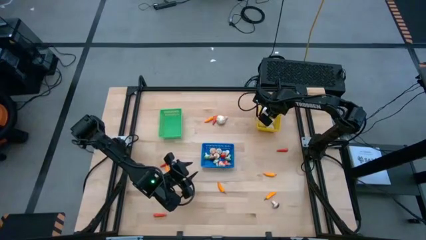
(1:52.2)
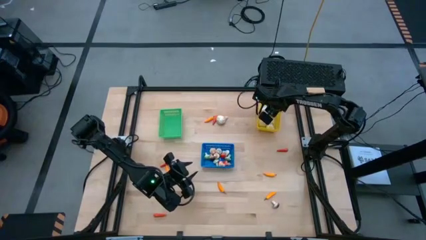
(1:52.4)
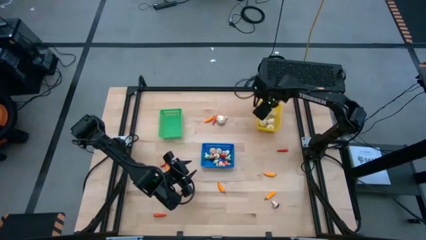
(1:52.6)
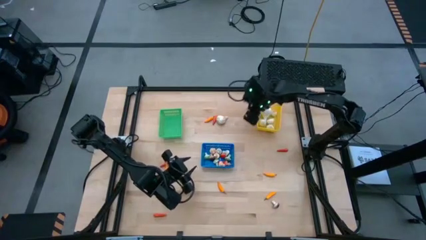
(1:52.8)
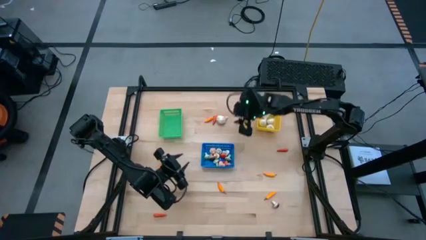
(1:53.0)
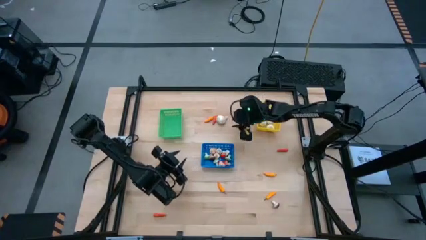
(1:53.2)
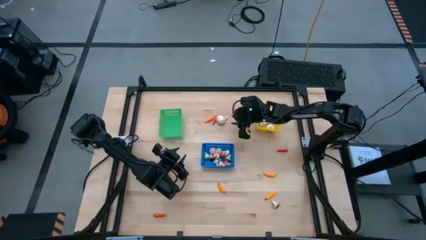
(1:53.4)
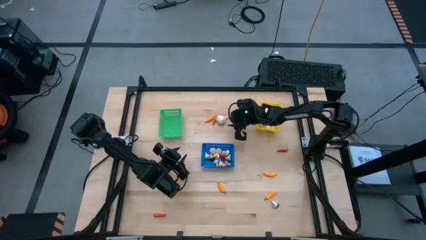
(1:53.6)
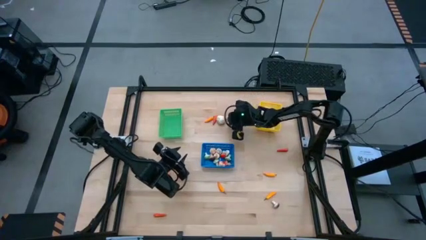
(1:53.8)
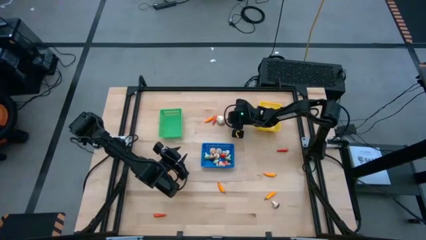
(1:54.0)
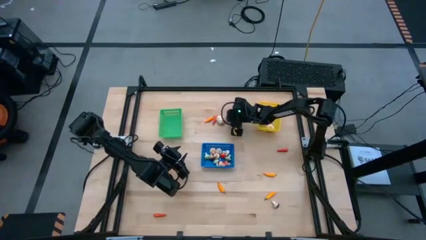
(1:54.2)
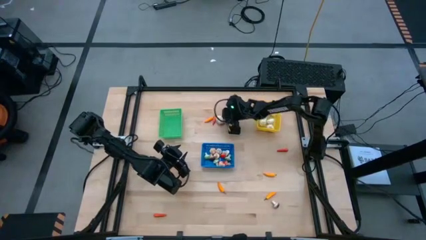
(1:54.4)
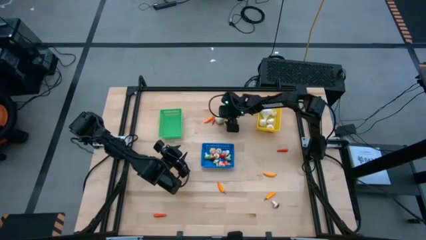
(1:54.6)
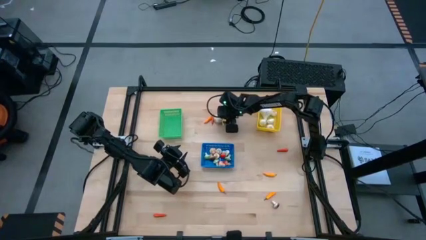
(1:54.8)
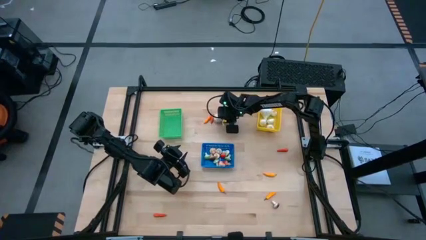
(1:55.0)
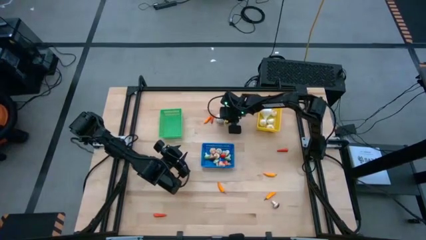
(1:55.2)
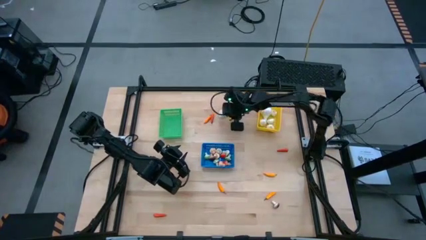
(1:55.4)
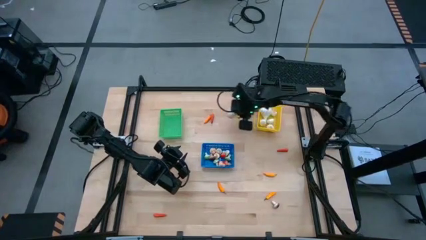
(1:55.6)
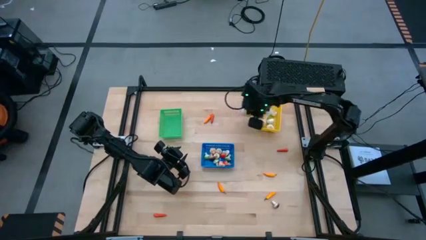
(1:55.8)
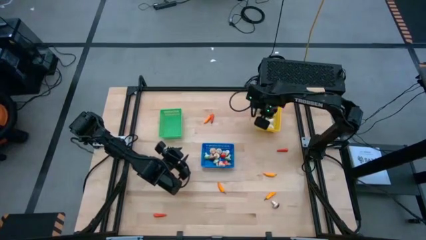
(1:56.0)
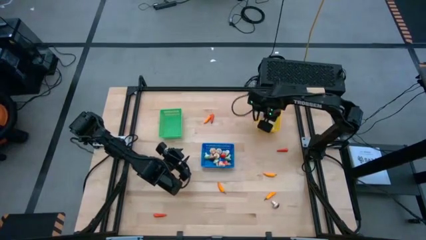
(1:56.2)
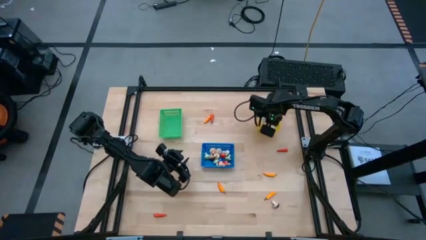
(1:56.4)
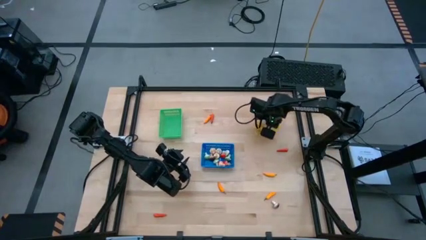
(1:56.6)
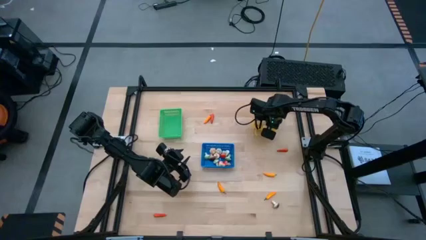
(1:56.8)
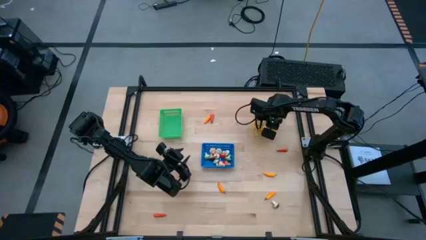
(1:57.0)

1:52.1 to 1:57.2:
Task: Sort produce into baskets
Put the white garlic into the yellow bin

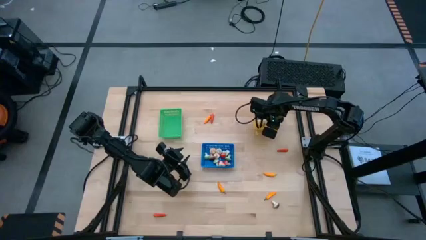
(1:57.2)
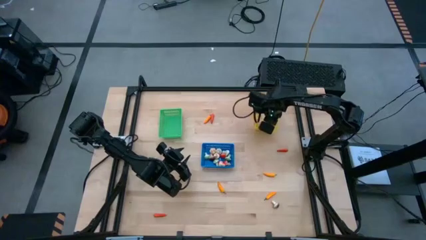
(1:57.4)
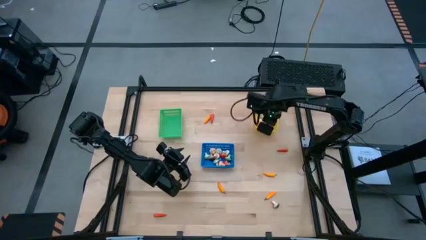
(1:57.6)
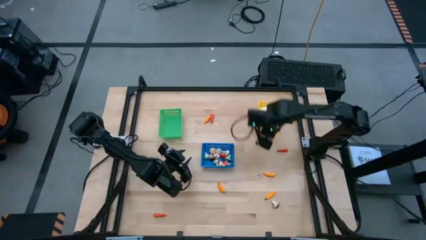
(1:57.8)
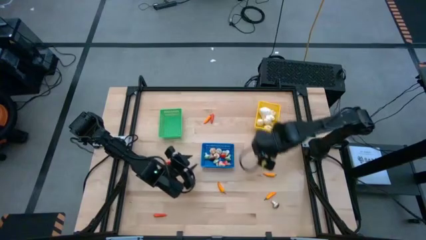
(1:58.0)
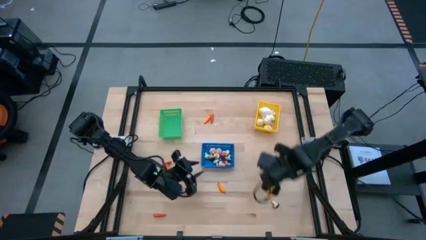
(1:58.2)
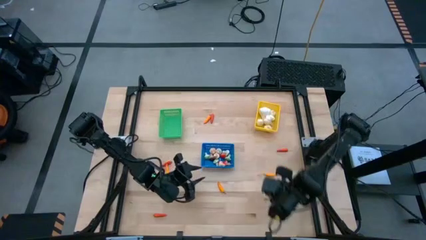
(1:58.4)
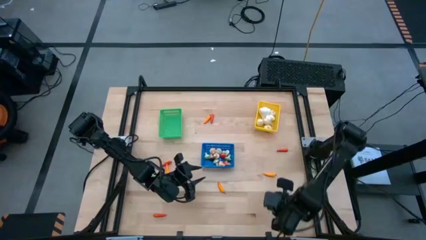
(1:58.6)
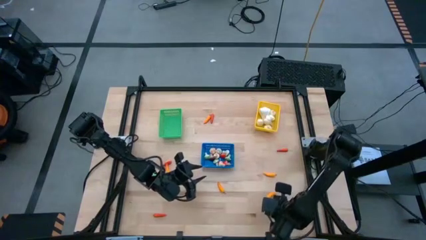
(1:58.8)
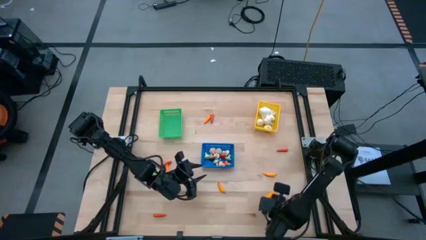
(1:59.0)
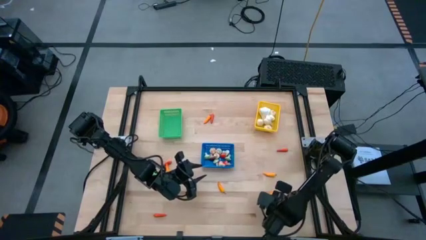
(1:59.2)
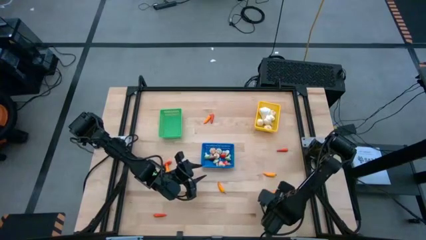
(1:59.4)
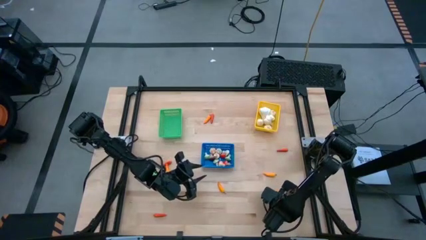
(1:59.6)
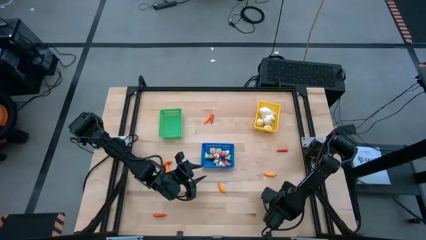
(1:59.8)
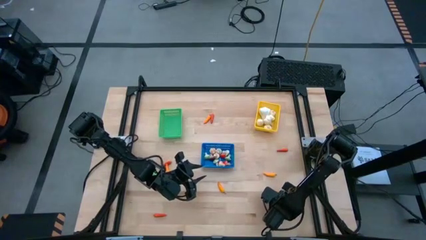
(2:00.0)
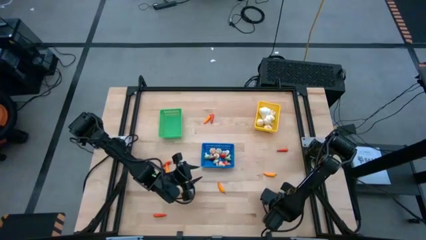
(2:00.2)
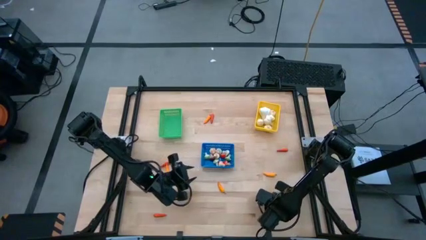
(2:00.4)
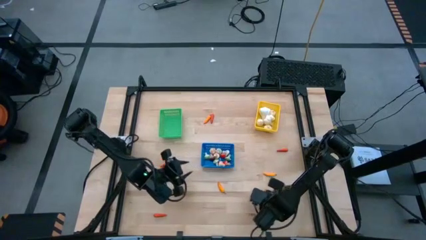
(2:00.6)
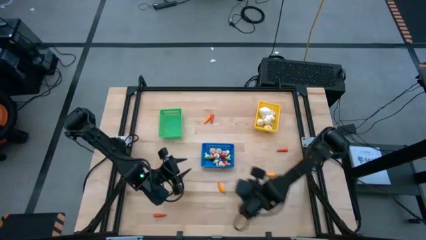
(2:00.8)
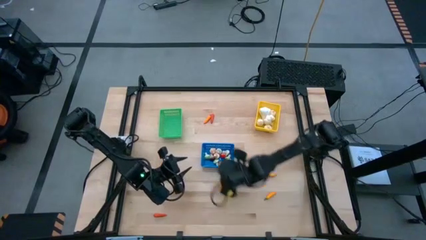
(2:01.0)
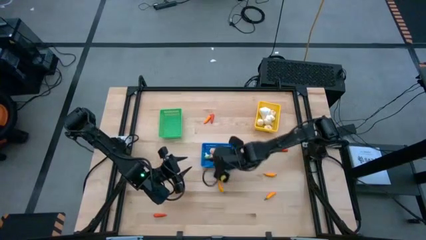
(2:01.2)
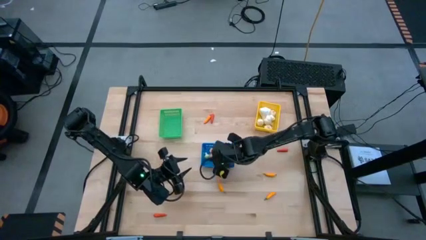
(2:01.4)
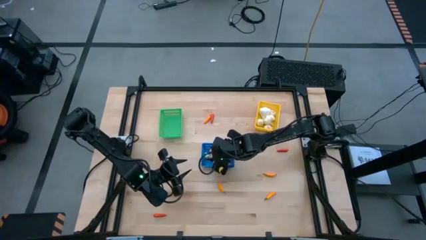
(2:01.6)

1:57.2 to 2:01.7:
Put the brown mushroom into the blue bin

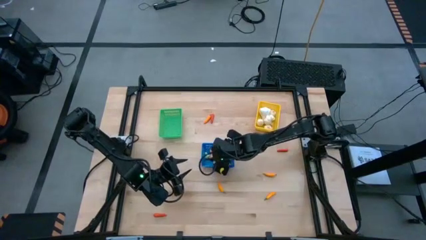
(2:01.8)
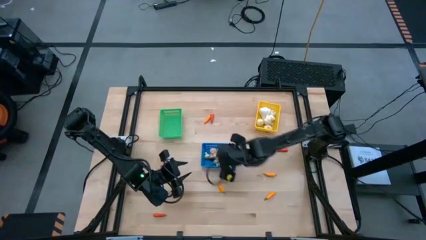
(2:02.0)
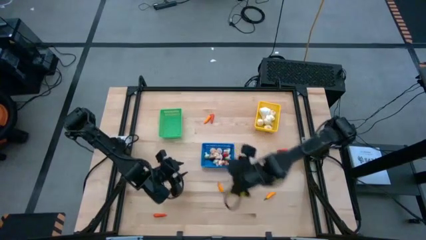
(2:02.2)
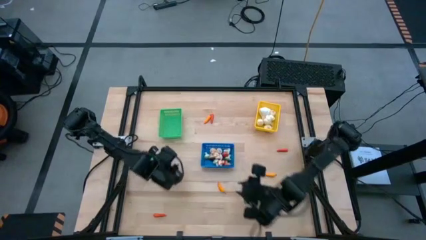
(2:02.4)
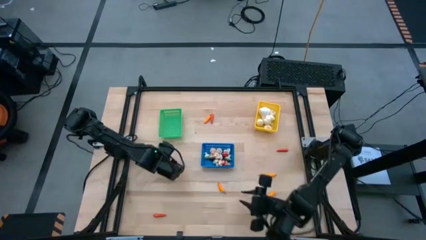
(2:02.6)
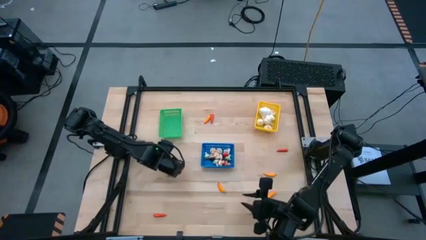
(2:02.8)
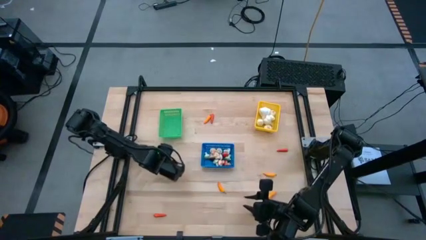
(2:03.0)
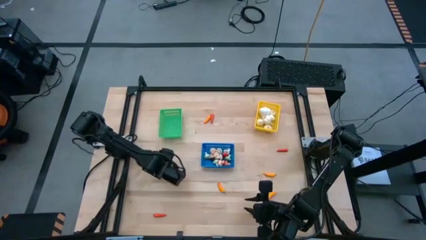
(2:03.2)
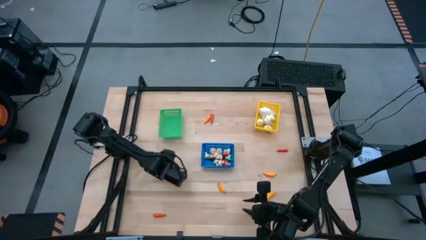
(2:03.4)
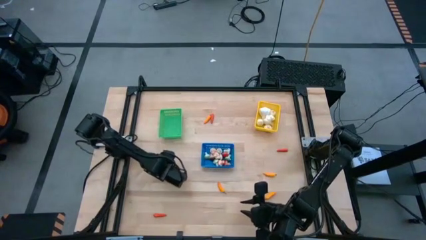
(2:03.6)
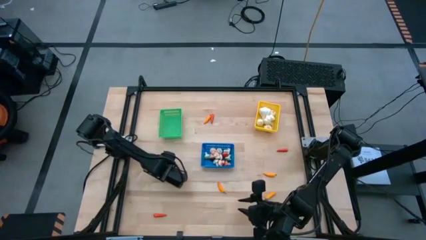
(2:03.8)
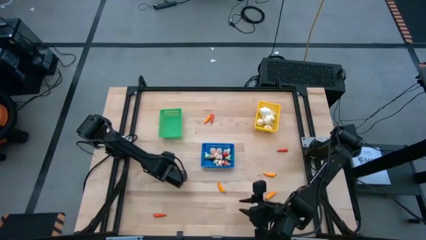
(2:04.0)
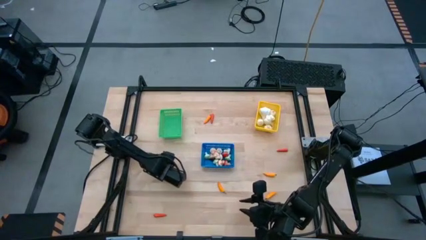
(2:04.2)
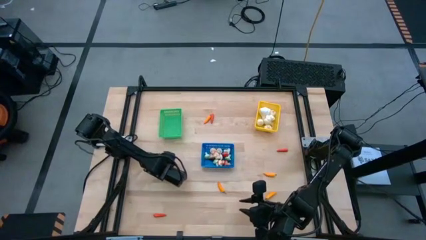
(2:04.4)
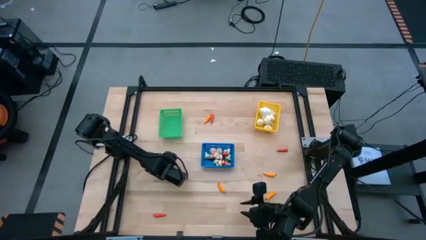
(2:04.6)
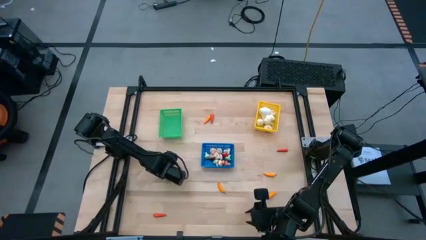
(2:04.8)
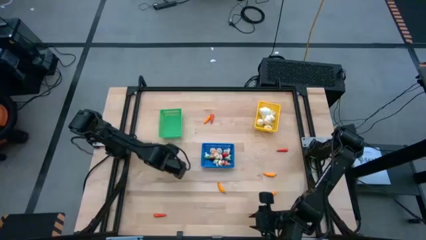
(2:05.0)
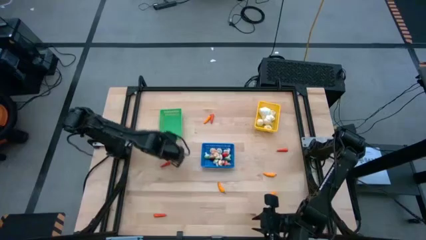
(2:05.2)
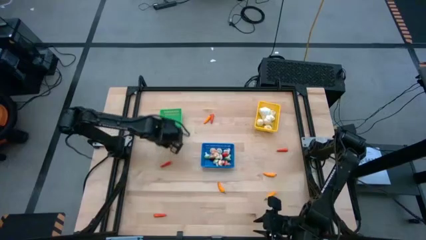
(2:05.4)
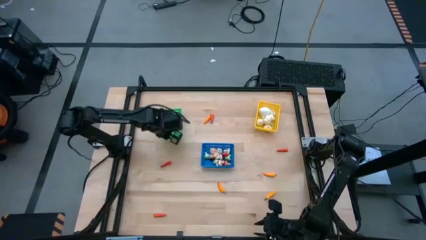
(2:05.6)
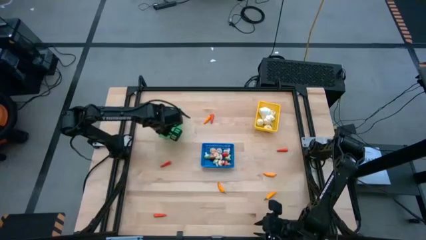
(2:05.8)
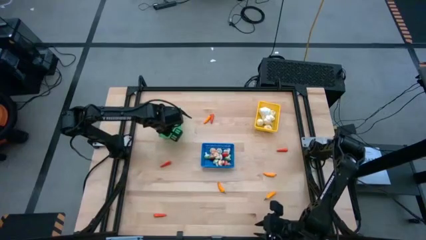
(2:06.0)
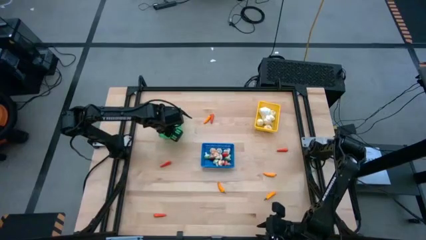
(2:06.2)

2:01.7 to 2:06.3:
Put the yellow chili pepper into the green bin

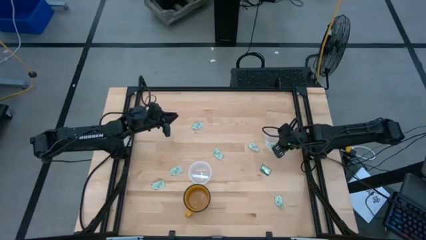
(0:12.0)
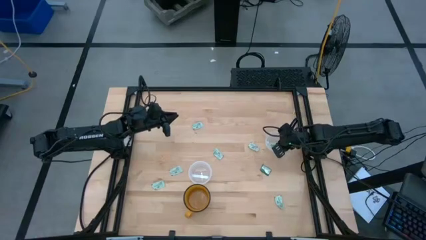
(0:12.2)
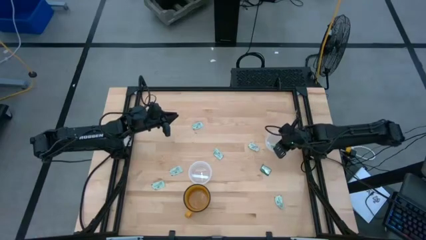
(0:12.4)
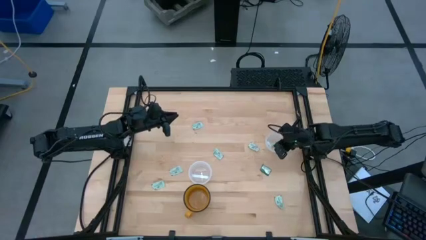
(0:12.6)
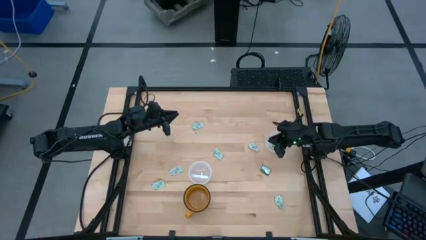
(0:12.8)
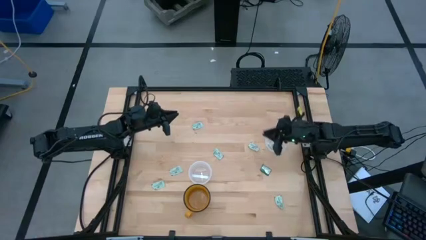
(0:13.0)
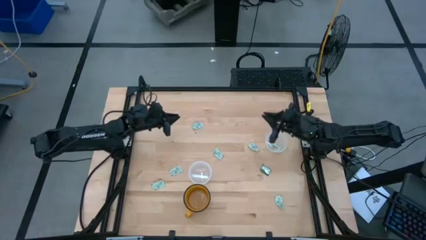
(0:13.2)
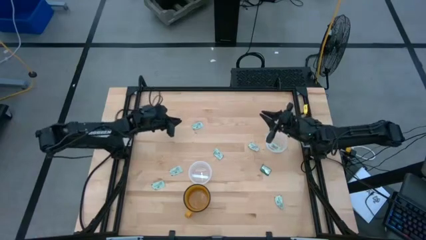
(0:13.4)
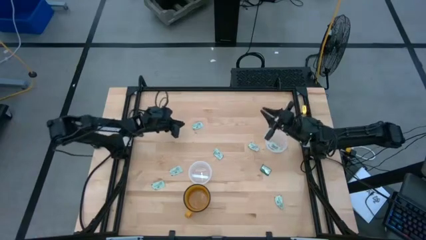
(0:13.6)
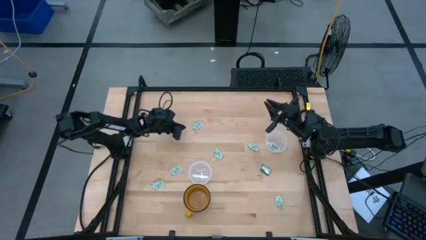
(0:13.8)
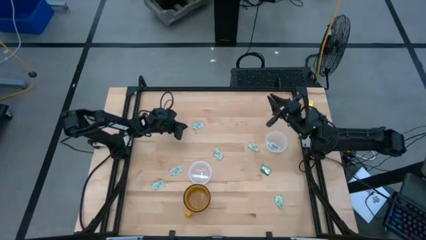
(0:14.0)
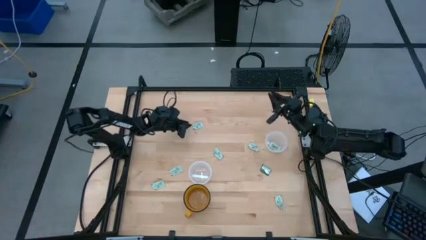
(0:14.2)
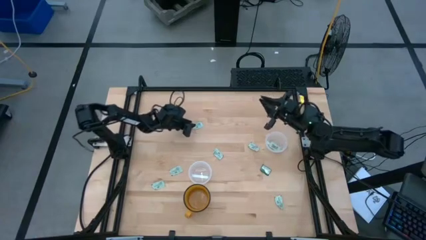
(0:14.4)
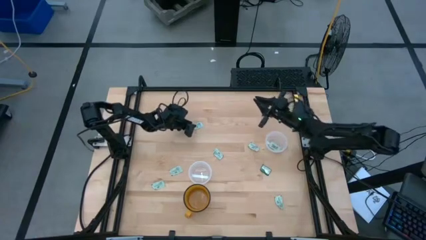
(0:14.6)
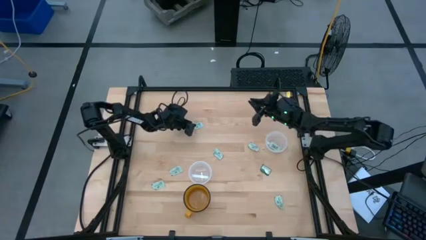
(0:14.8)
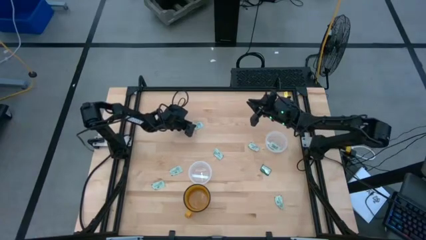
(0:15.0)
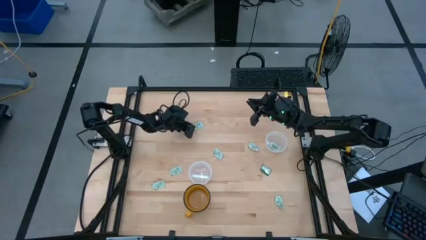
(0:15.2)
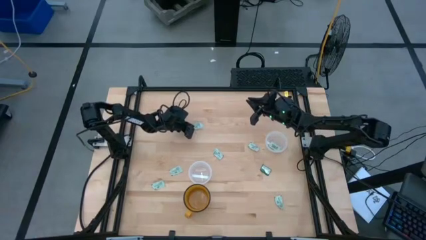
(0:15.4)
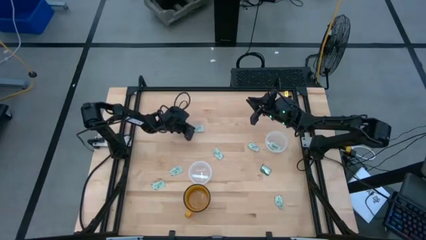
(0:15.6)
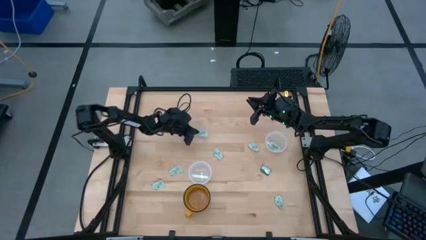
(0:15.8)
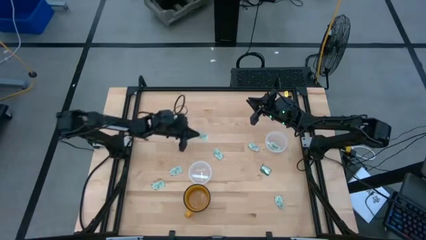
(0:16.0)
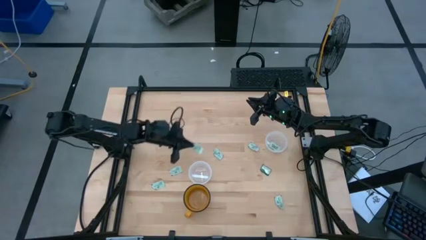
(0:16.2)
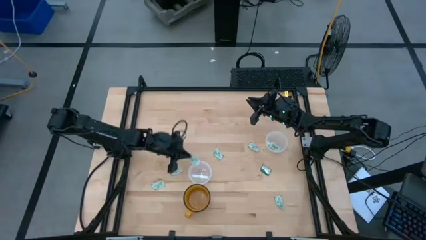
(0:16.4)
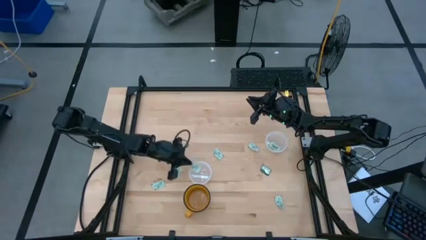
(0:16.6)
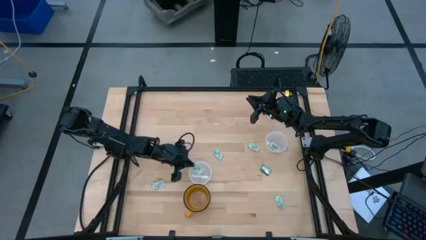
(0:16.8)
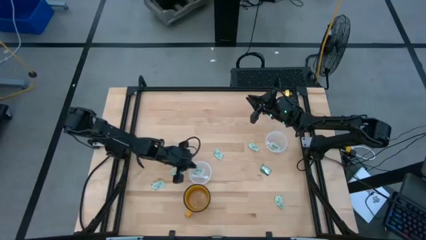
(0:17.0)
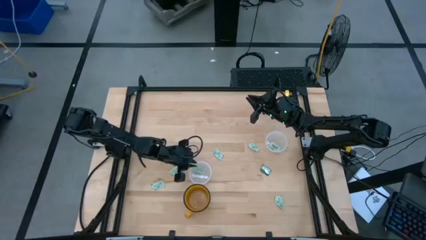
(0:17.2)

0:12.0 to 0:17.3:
Task: Pick and place items into bin
Put the stevia packet into the left transparent bin
